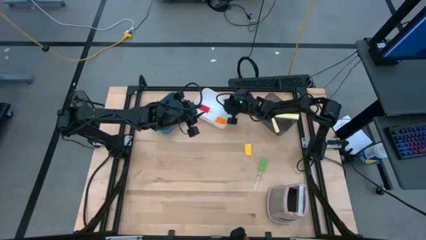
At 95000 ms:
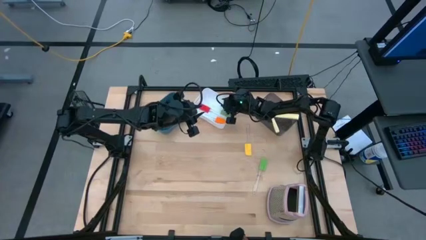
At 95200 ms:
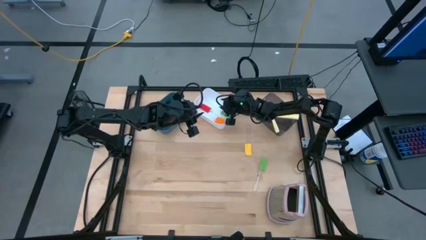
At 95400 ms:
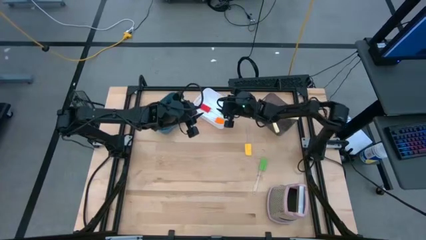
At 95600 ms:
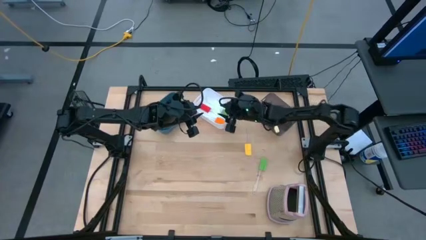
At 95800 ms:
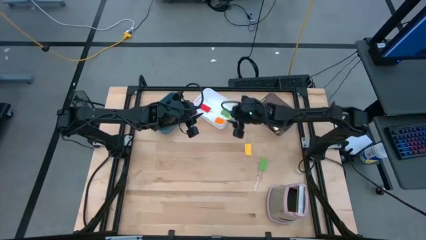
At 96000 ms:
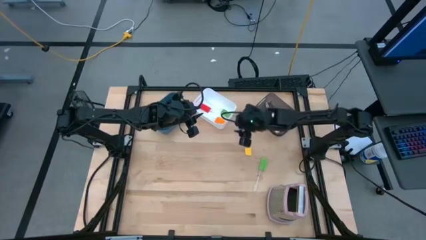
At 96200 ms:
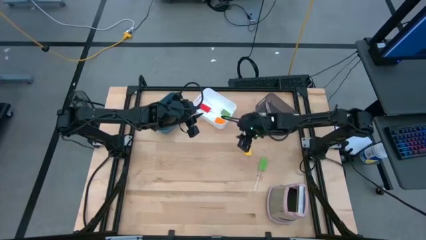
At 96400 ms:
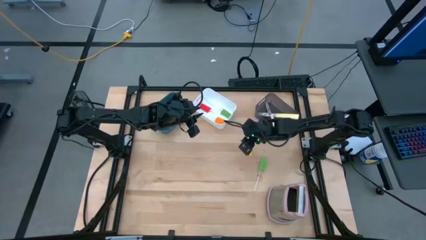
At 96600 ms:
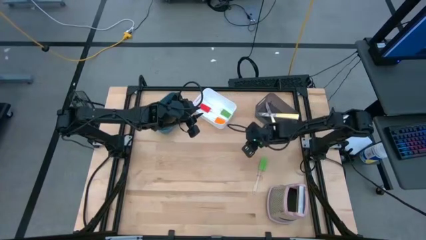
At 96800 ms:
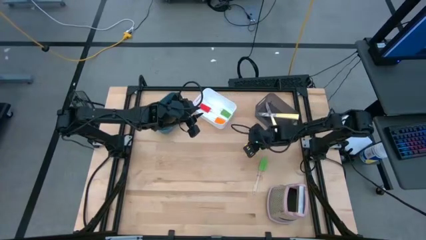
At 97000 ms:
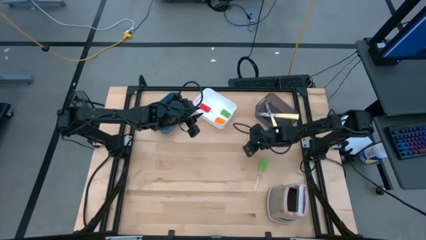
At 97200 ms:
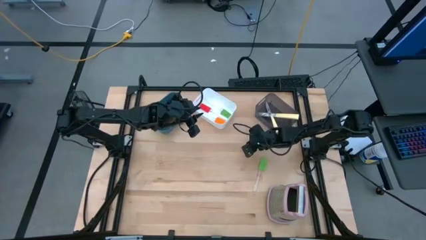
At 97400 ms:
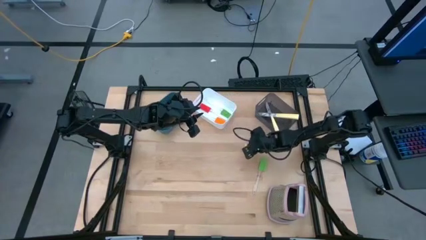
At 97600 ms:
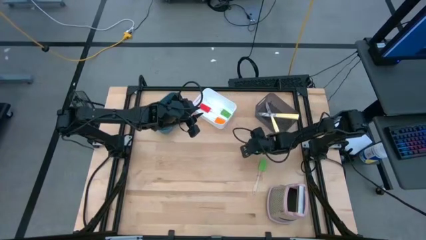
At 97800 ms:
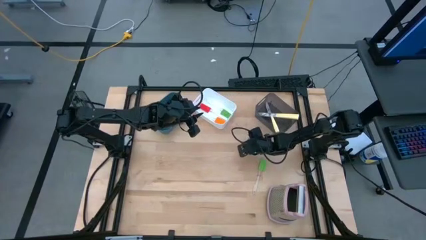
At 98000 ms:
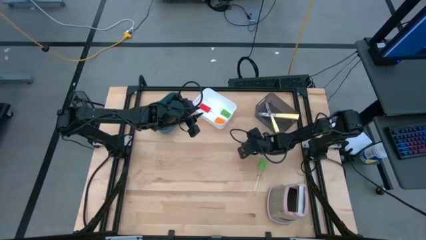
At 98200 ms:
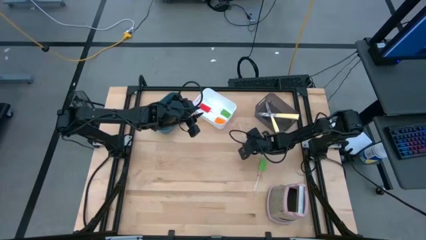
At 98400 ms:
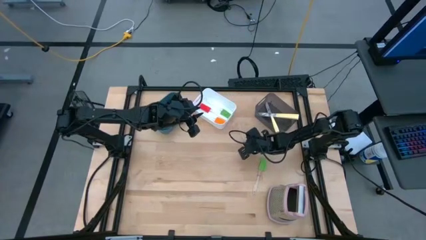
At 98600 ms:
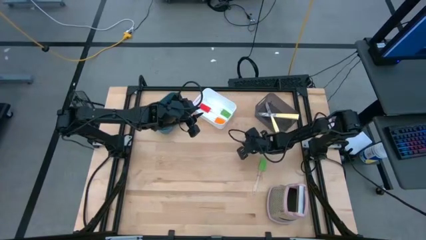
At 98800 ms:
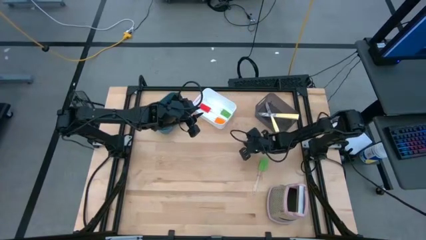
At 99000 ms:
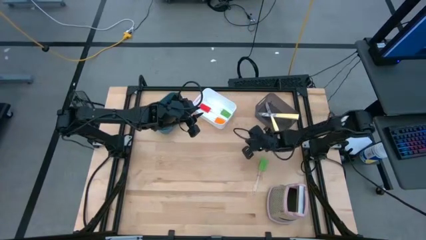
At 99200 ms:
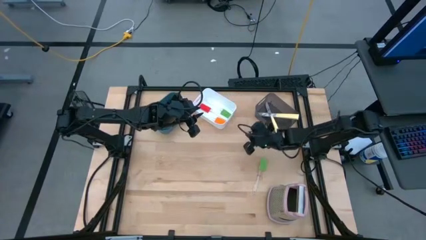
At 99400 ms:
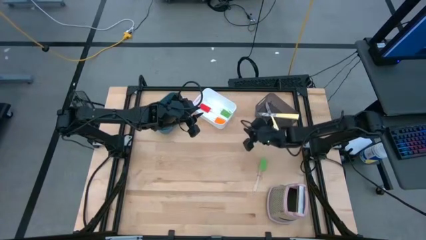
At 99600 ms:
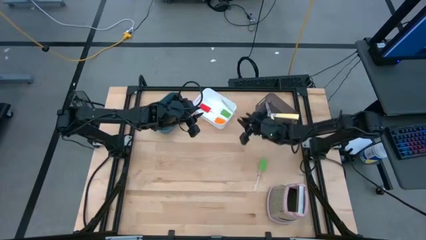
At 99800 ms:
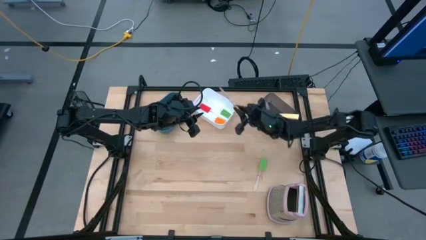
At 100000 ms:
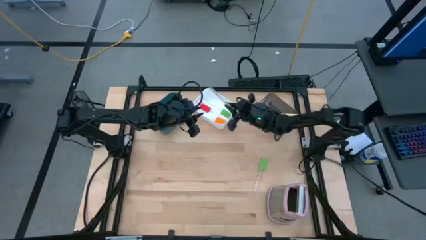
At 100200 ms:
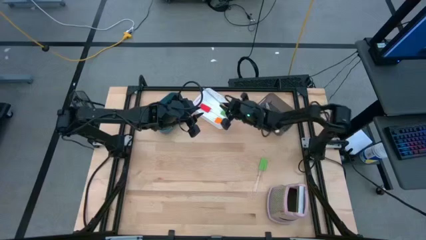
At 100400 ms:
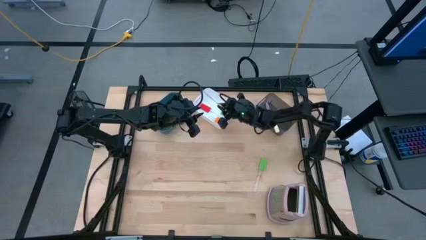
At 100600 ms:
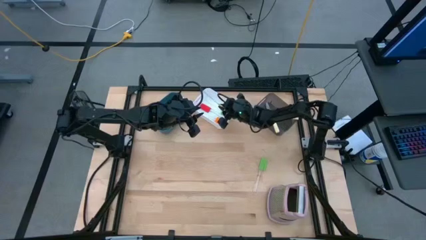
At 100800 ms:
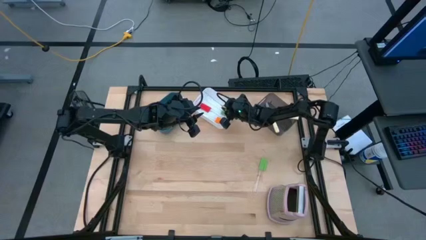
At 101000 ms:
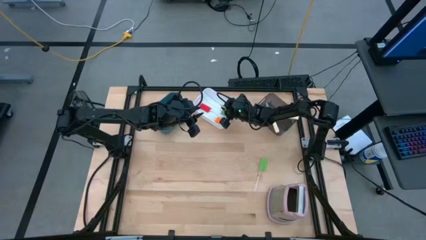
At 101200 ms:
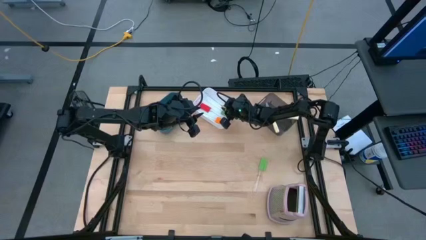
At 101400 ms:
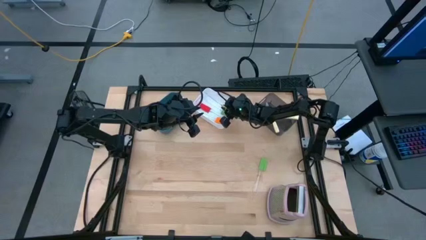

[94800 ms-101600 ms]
Task: Pick & Place Kitchen Items
Put the yellow spatula into the white bin

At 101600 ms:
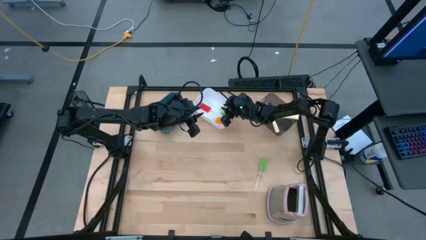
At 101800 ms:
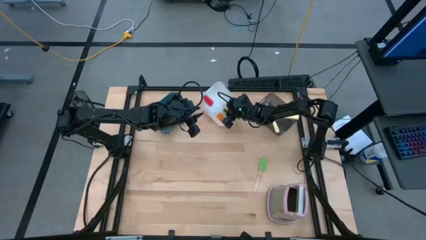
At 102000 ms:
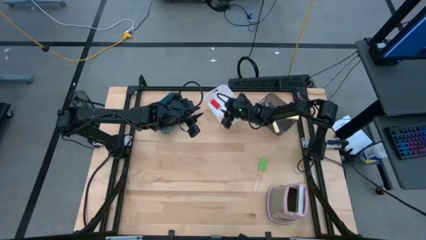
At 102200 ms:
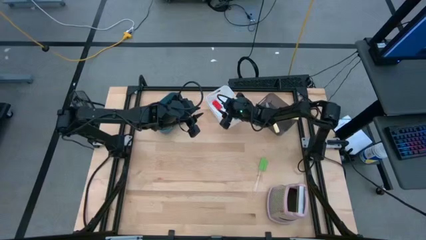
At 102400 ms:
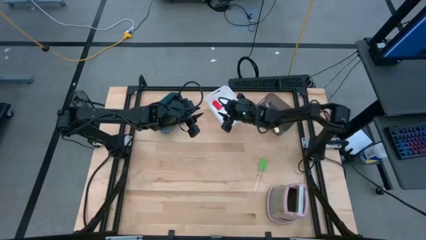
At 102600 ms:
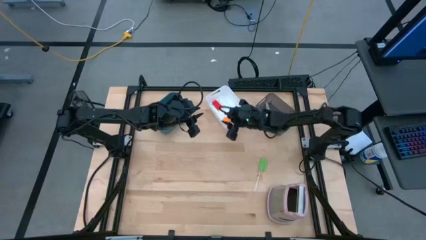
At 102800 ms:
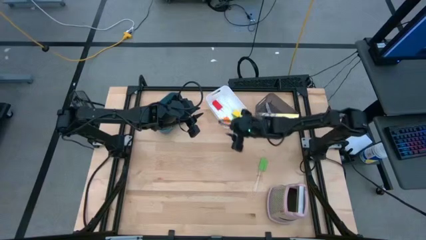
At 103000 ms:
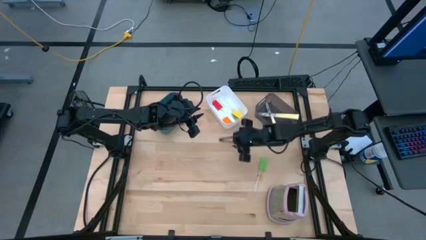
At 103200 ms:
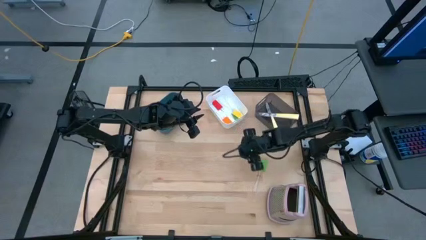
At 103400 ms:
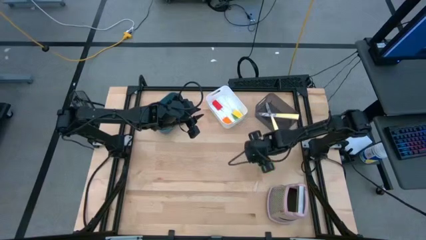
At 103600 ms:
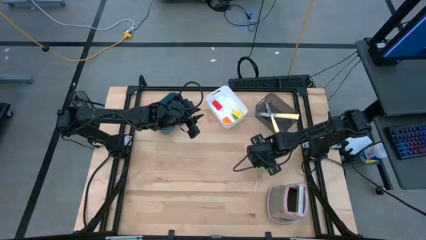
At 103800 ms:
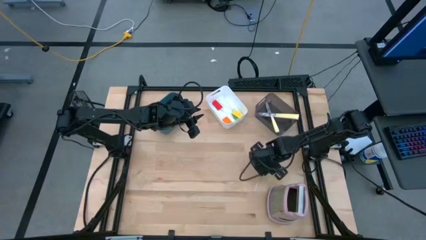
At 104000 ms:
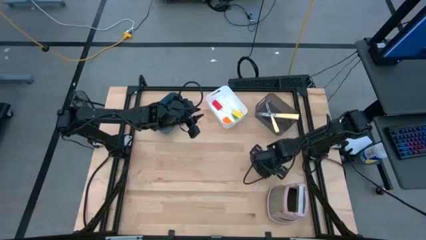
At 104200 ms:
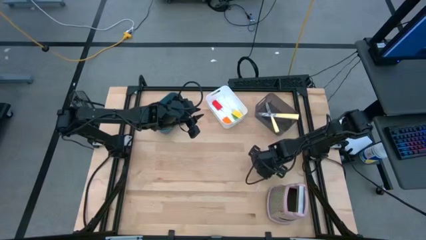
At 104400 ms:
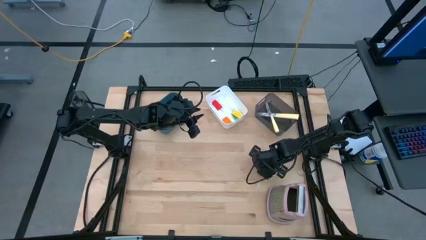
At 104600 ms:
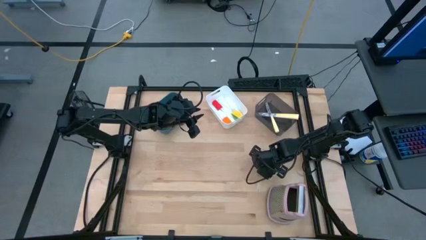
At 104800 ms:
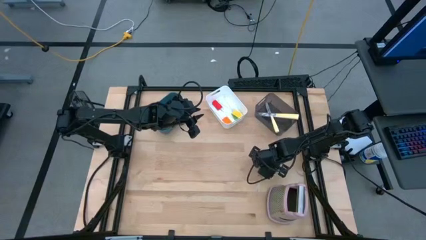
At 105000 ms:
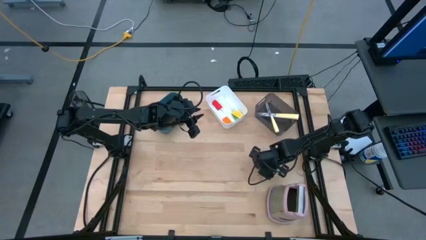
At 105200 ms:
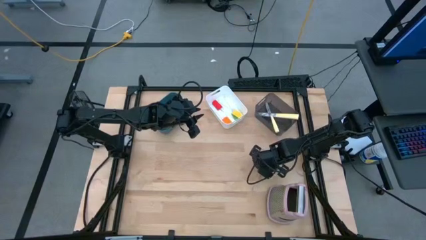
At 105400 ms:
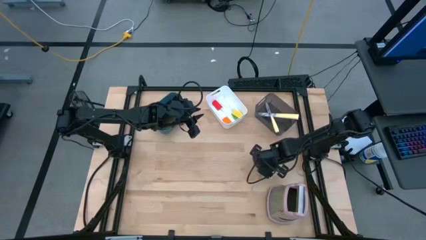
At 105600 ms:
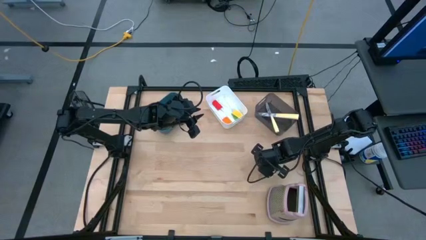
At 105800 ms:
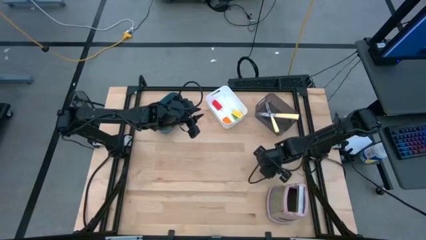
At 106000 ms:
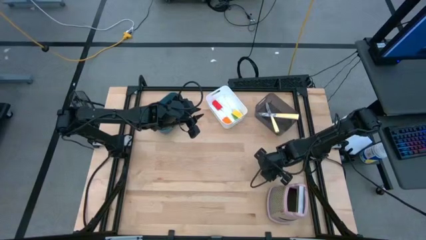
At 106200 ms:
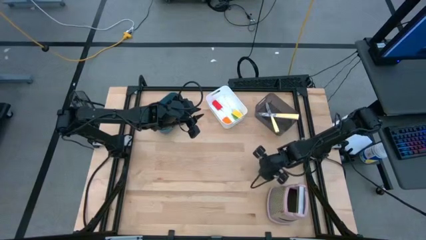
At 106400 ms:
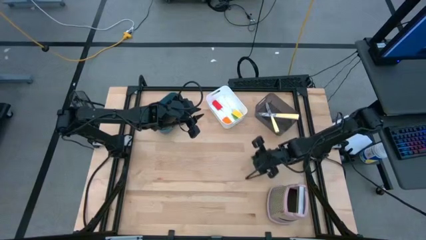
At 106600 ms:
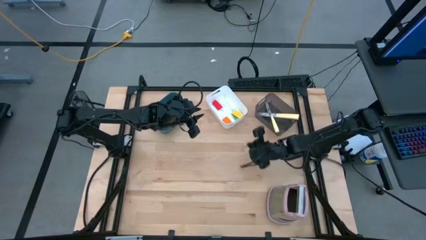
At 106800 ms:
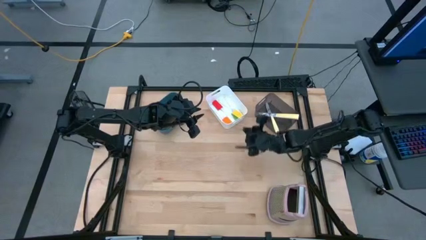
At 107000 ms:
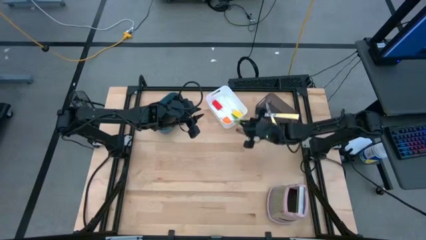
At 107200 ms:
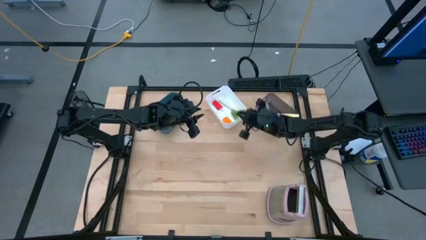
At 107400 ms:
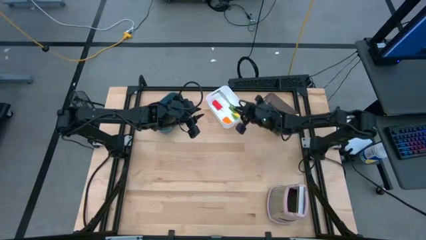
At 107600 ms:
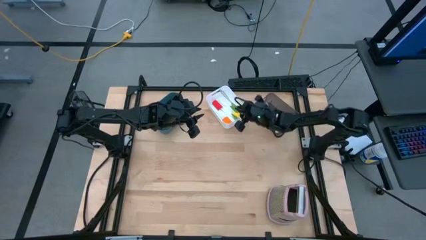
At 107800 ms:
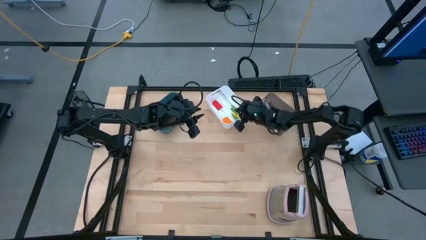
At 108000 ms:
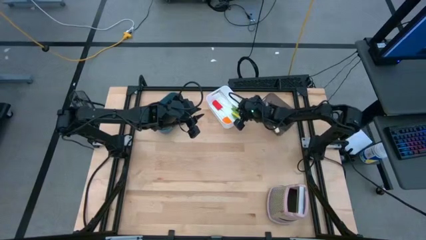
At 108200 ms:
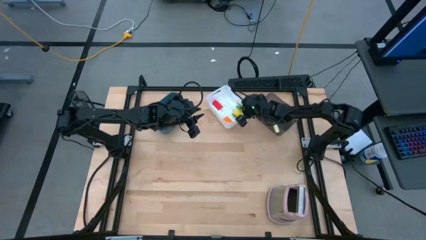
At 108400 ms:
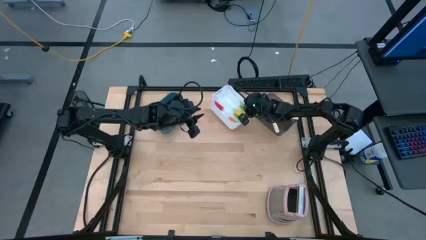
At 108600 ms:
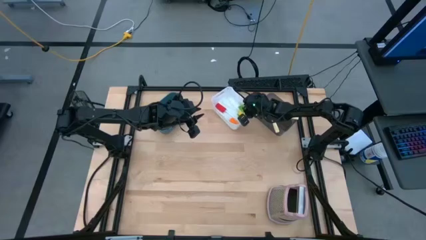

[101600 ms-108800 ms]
Put the green spatula into the white bin

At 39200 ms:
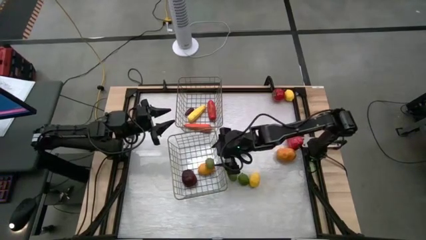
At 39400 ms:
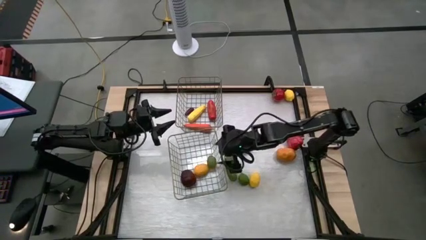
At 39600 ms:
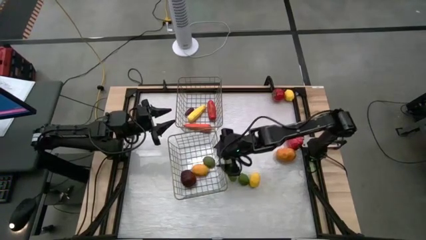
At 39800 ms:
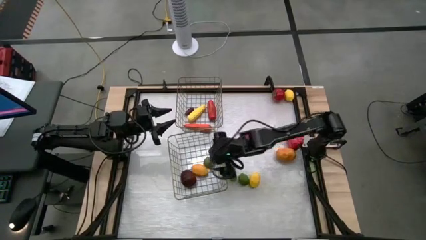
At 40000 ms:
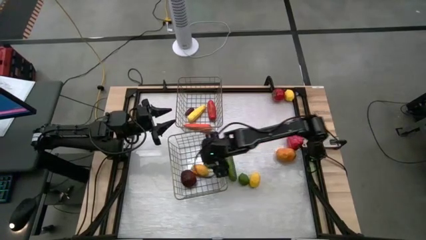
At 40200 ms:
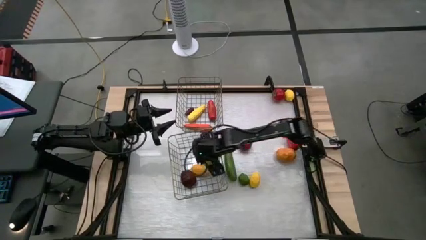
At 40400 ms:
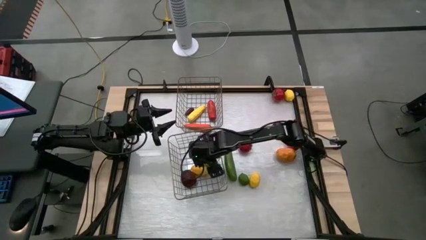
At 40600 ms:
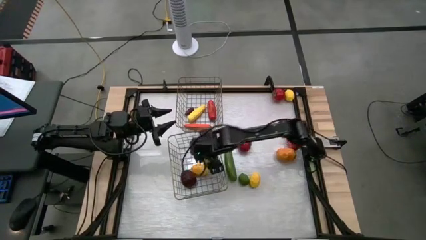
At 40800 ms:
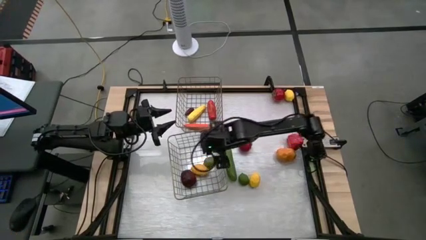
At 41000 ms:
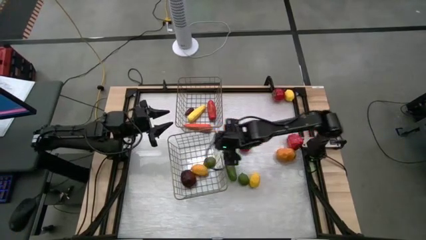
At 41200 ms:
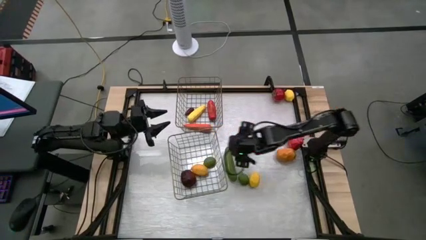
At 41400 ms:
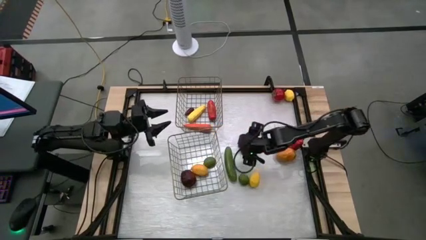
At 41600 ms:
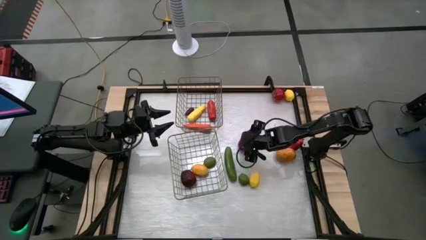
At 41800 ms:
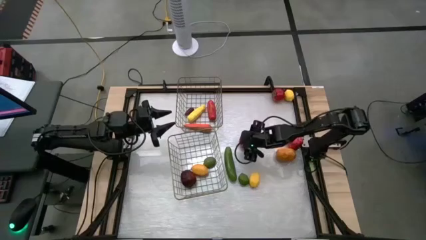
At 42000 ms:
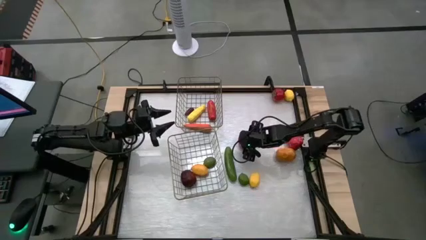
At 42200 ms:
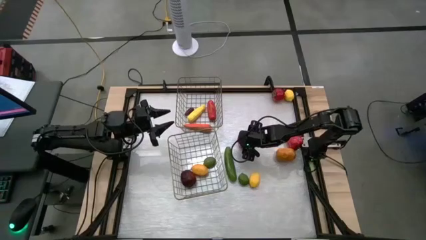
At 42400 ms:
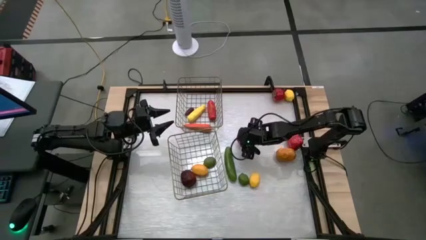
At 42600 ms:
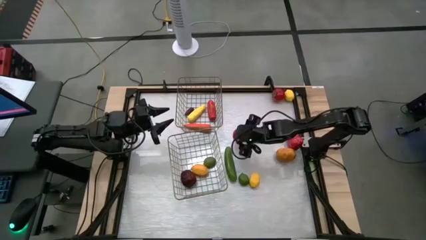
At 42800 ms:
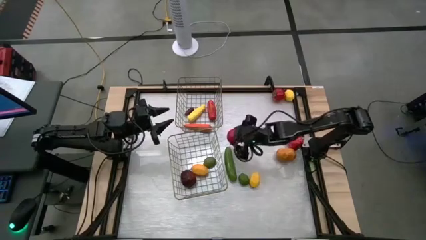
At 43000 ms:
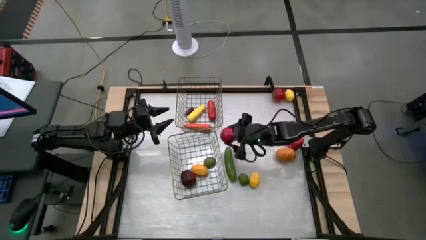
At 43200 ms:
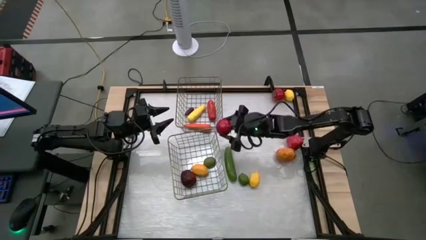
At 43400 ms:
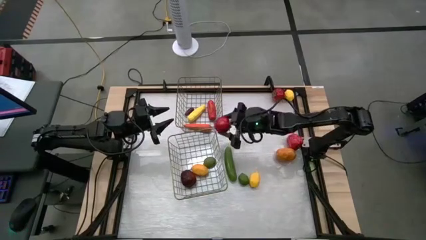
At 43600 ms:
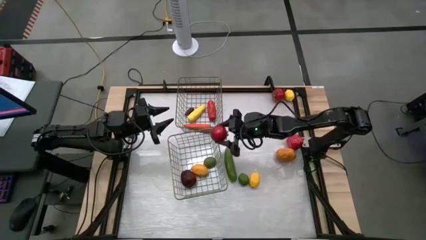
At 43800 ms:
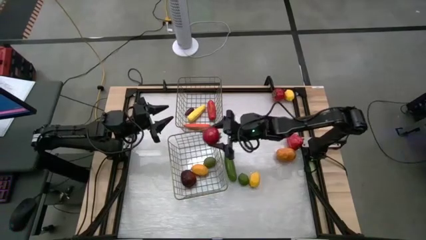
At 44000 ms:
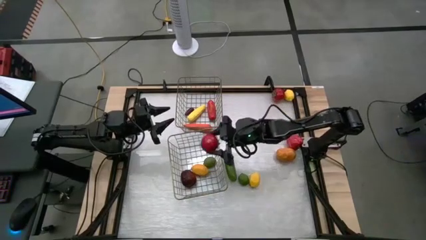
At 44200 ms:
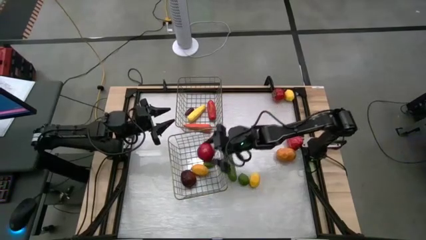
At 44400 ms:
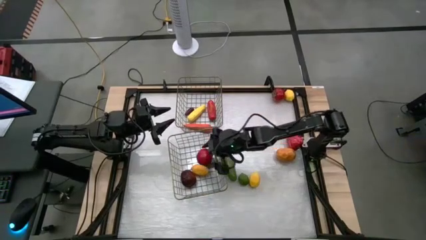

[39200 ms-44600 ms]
Task: Sort produce into baskets
Put the bottom red tomato into the bottom basket
